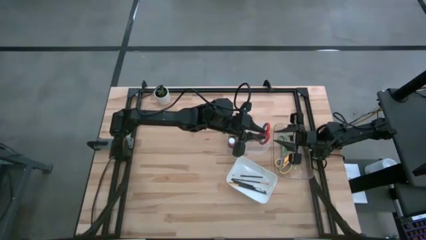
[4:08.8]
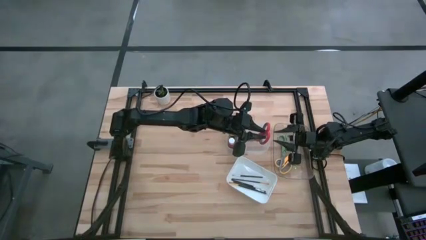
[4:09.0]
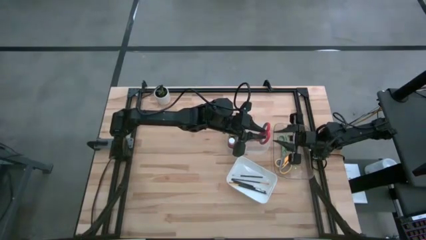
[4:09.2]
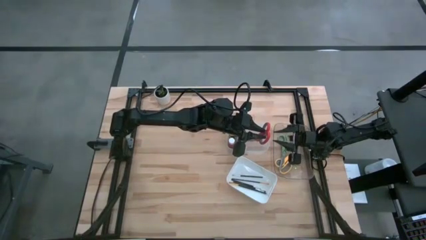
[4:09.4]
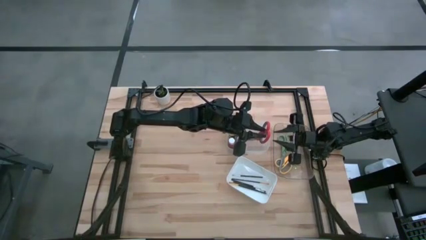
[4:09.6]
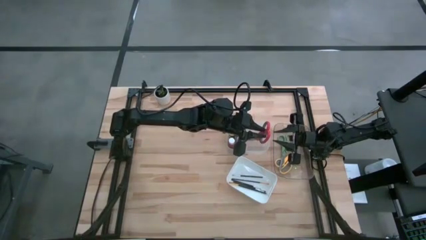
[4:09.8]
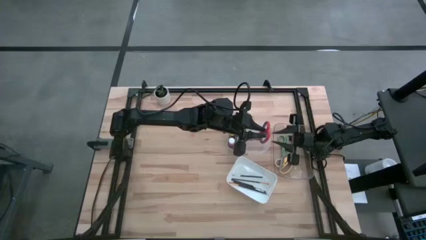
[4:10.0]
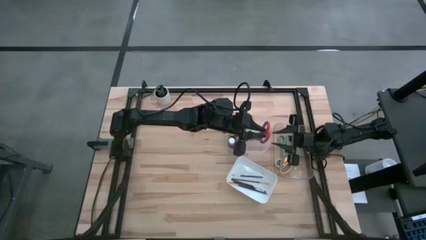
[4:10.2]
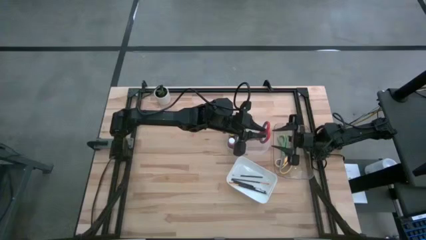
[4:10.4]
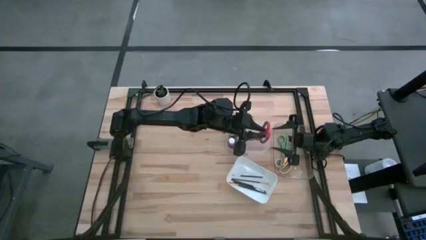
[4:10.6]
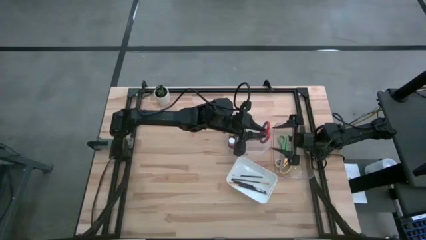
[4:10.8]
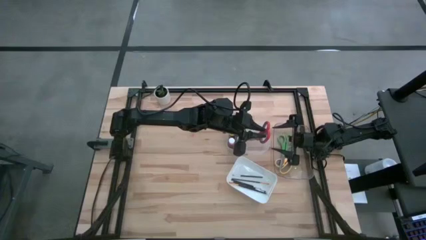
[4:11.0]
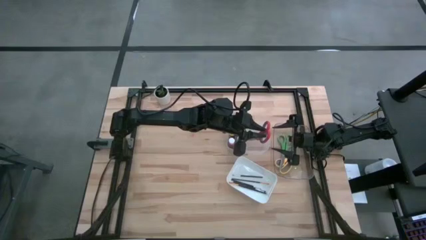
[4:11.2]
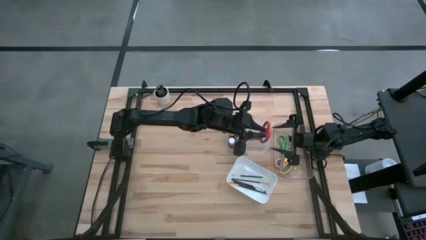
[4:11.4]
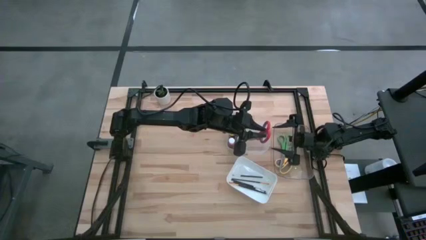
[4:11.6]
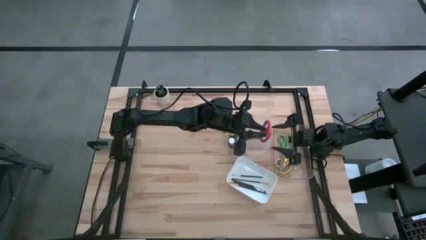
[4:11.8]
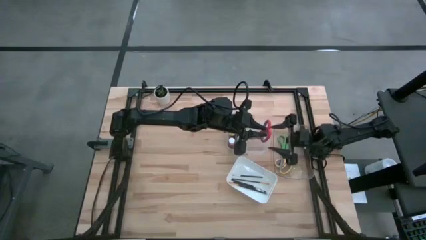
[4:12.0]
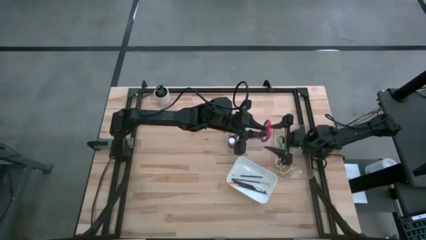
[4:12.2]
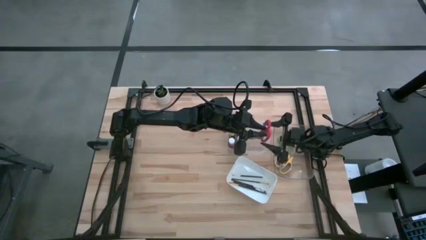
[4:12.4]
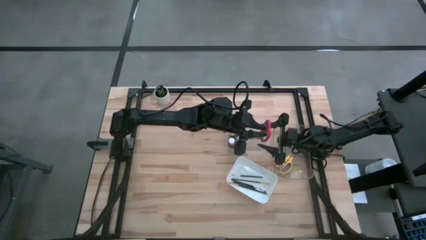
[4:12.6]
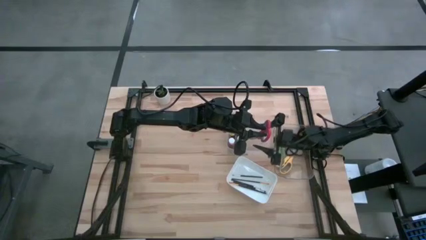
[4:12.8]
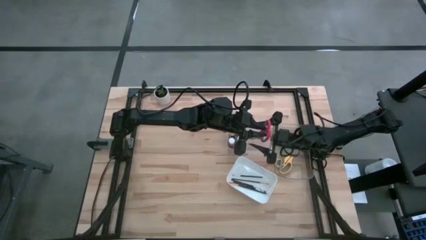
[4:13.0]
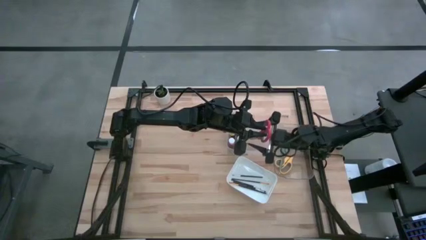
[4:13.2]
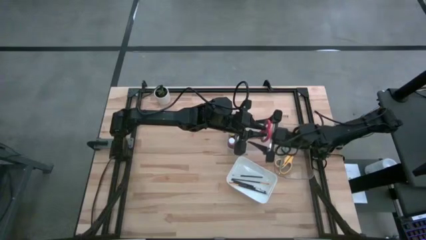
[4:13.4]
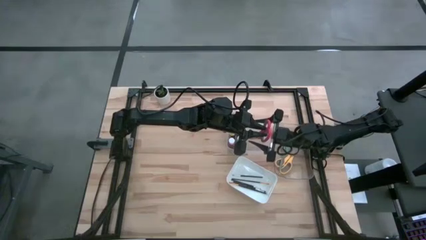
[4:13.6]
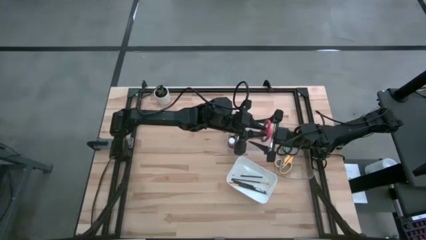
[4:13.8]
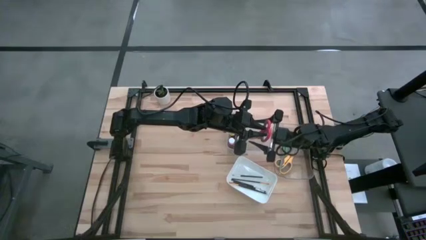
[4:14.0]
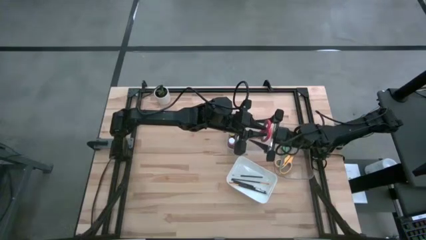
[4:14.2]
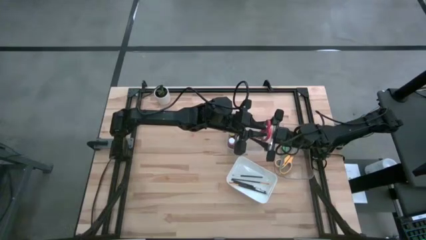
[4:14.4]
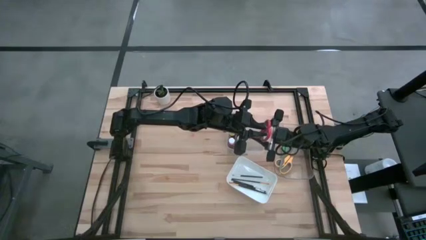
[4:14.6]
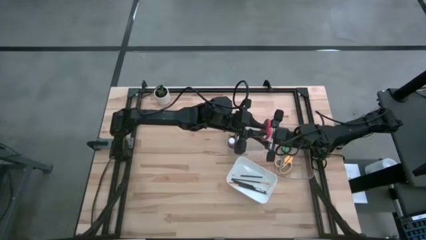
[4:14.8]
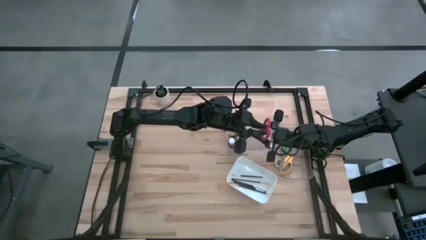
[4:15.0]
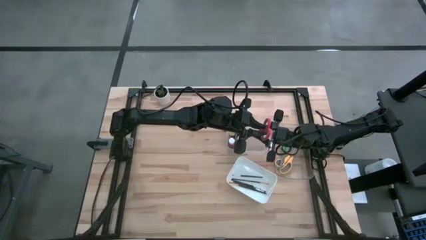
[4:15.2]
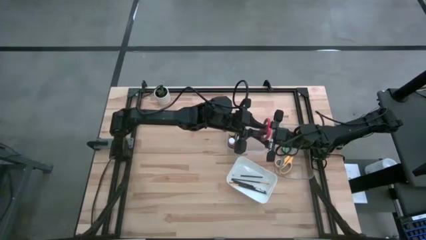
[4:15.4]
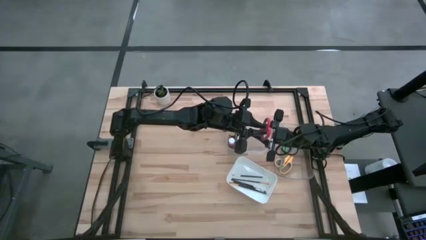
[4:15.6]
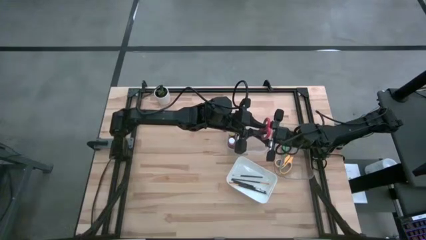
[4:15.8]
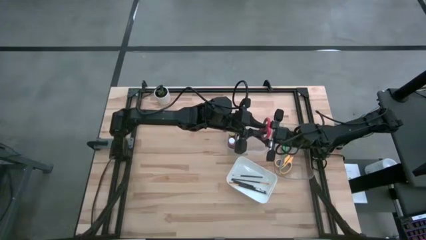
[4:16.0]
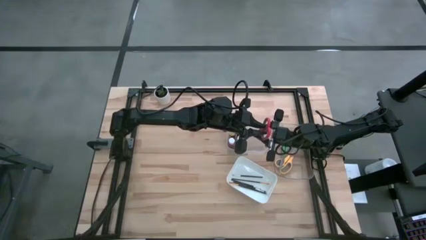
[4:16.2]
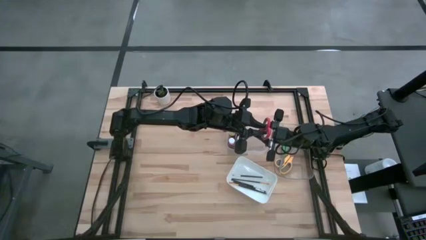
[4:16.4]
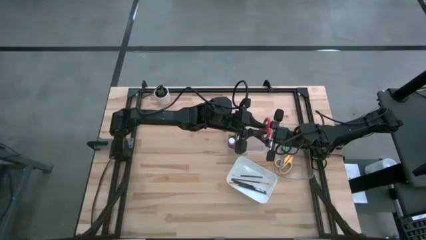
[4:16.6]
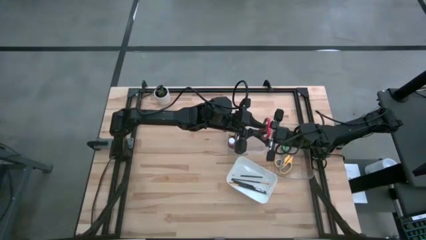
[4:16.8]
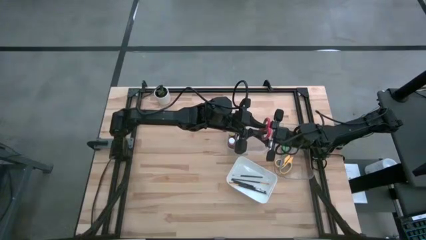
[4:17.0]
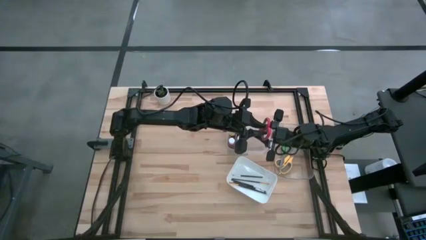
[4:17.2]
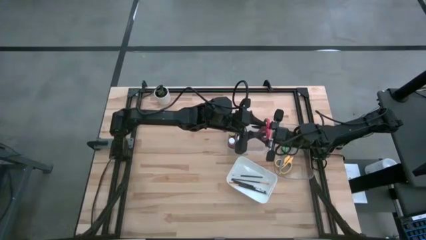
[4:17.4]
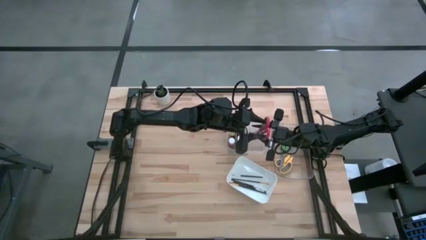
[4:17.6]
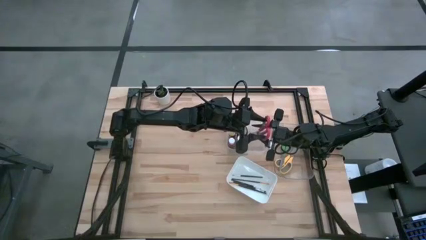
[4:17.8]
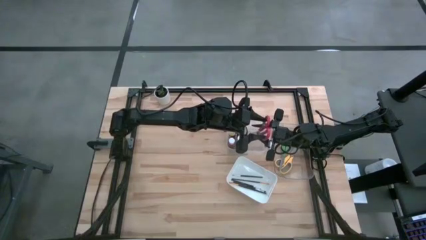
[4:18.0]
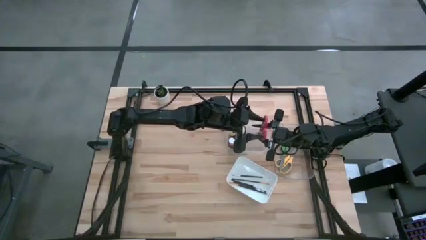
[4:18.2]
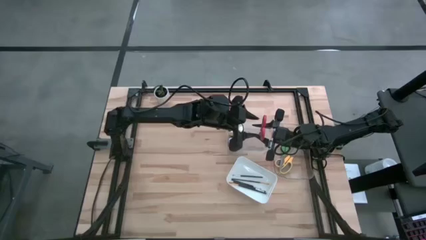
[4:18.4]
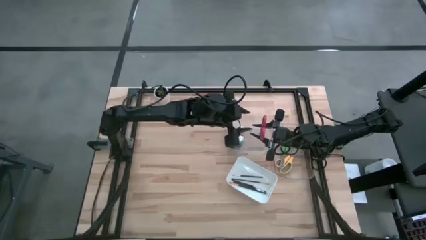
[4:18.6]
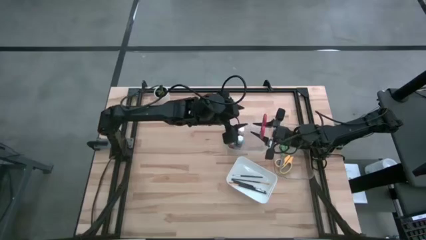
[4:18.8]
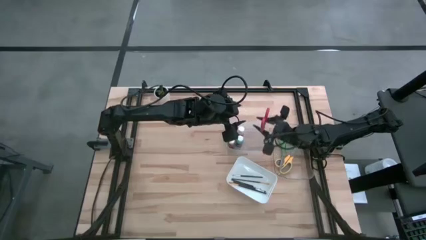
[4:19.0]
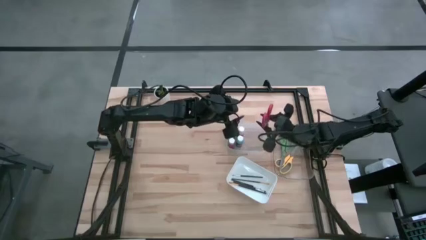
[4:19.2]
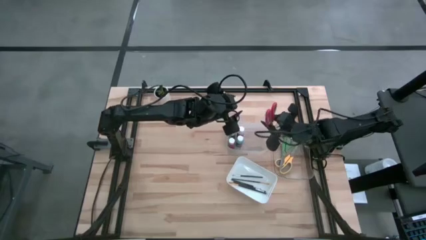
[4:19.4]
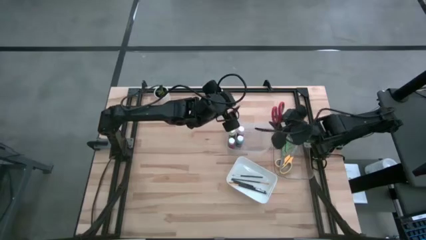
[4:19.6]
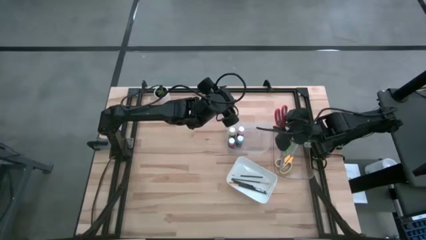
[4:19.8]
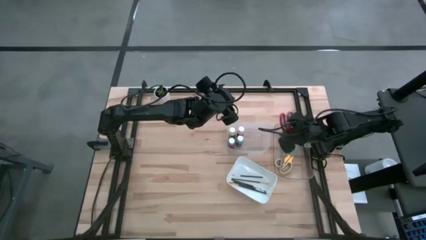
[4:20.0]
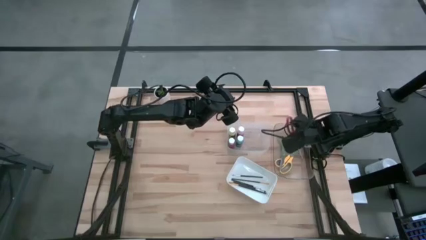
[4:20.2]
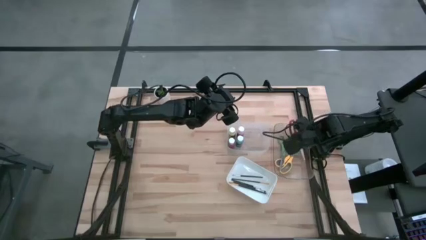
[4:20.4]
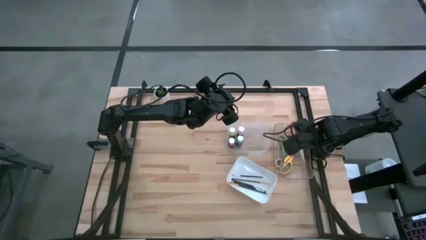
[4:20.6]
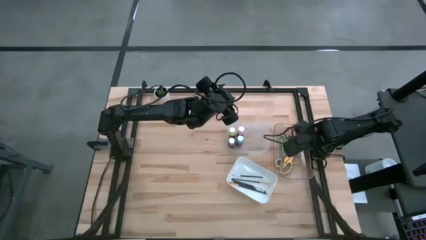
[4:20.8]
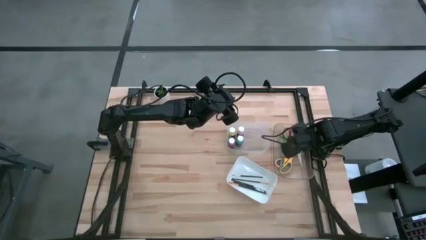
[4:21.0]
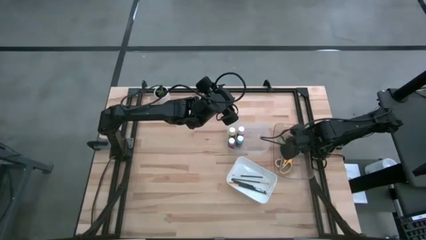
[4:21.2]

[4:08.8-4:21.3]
Task: Pick & Place Paint Supplies
Put the red scissors into the right transparent bin

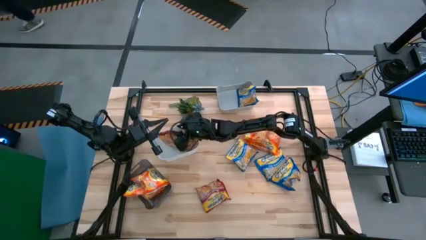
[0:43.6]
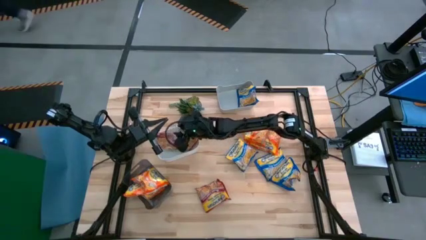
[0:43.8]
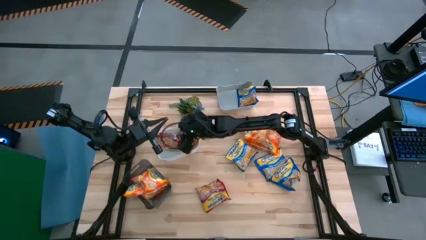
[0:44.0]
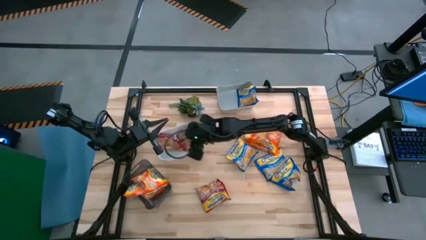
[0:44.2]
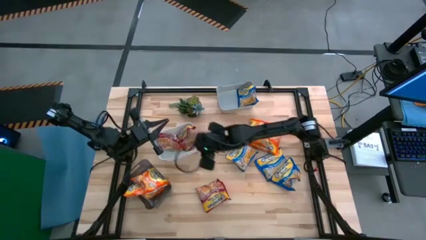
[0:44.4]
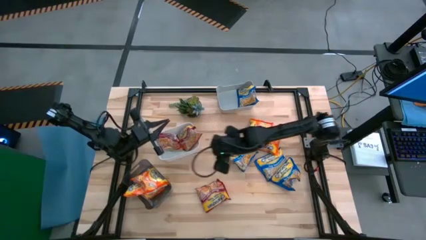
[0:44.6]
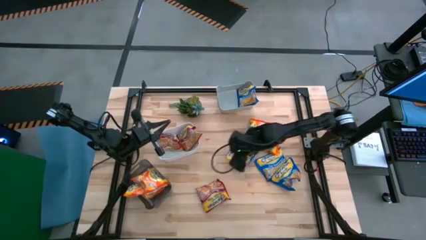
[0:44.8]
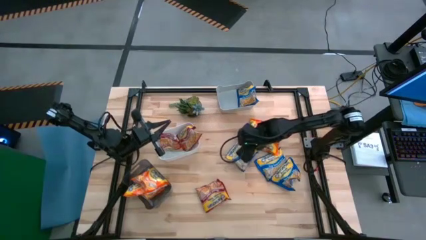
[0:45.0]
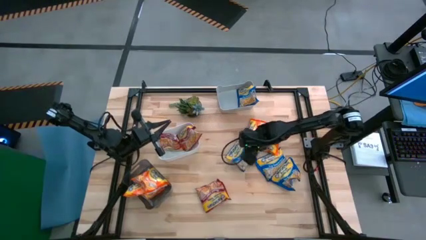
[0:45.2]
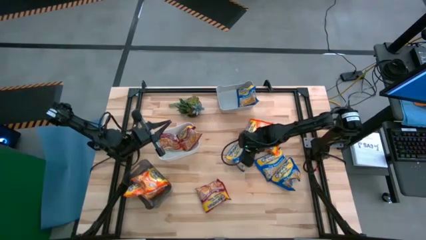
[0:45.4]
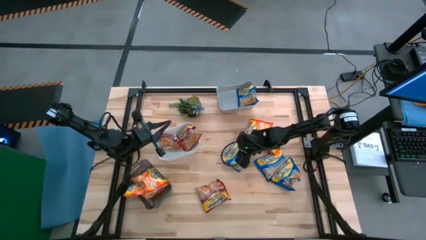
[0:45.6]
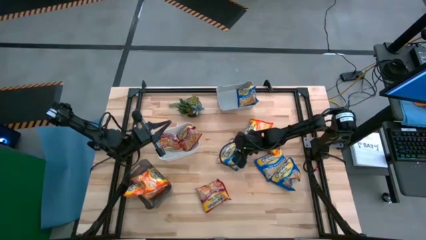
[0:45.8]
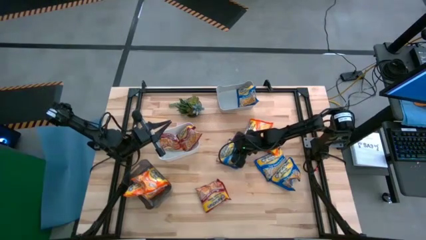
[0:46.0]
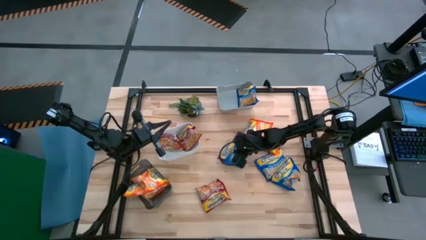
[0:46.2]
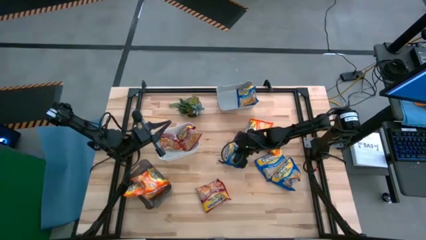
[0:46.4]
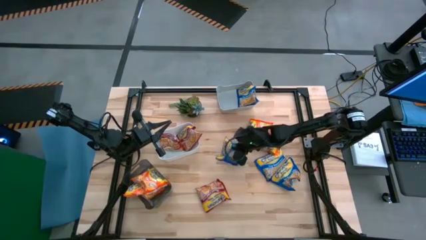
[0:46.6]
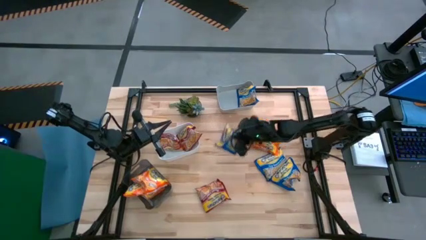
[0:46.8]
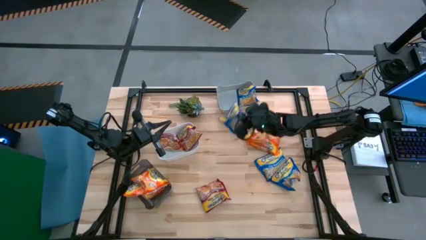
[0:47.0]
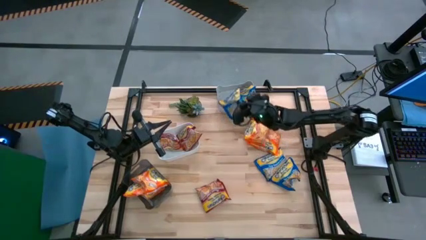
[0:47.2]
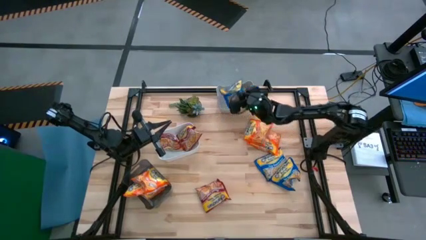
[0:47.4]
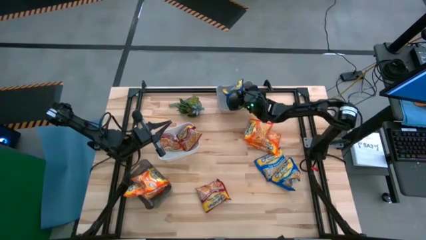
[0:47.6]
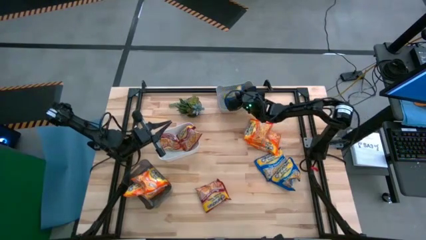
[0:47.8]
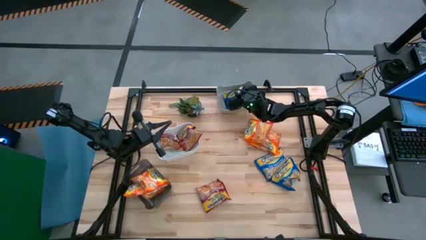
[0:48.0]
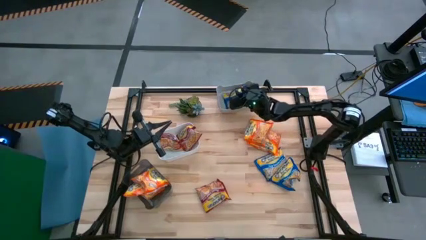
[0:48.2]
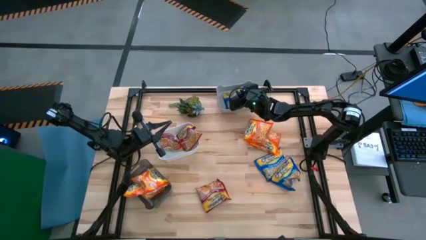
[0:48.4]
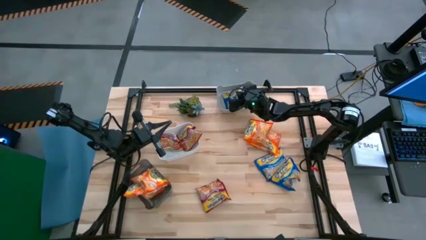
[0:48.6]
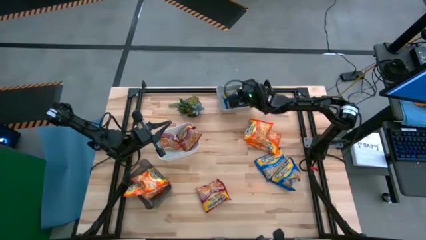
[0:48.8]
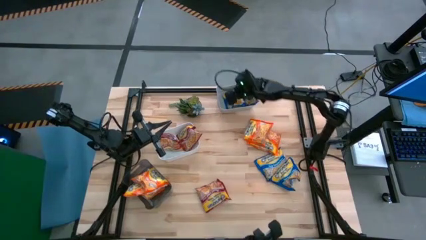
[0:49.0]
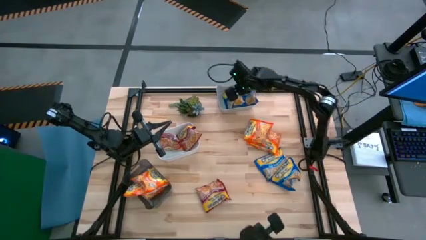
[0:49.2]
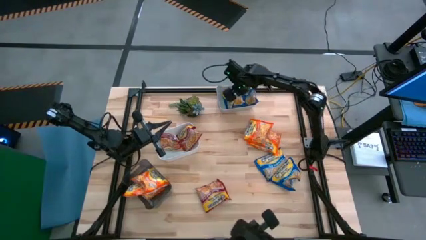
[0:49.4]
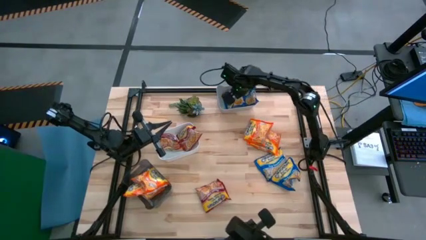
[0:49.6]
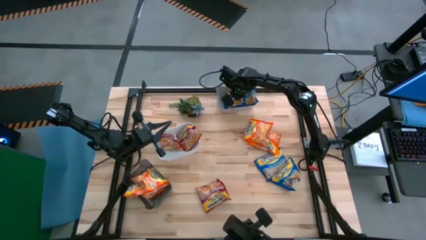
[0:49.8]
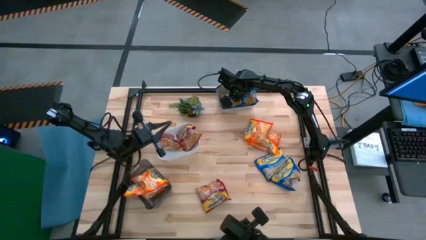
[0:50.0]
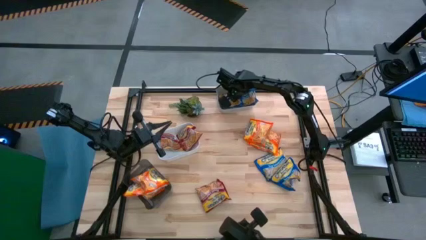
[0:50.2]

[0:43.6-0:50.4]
Task: Sort Maruchan noodles
Put the blue noodle pack into the gray bin
